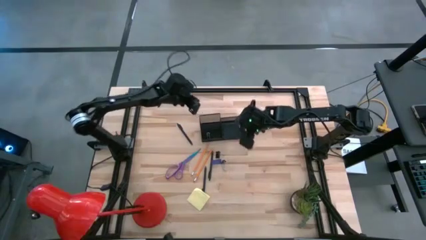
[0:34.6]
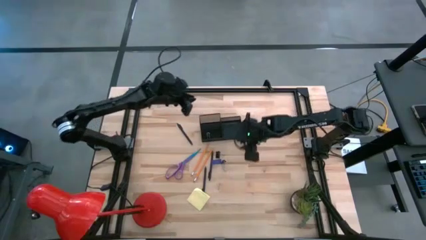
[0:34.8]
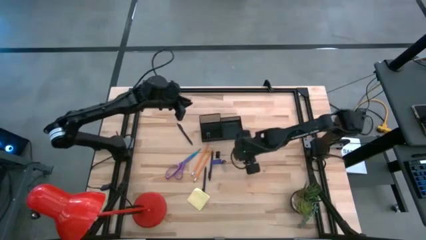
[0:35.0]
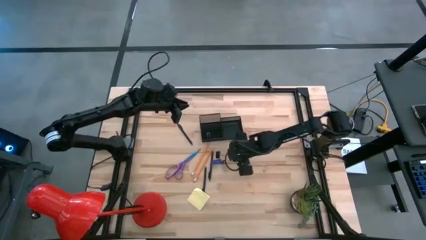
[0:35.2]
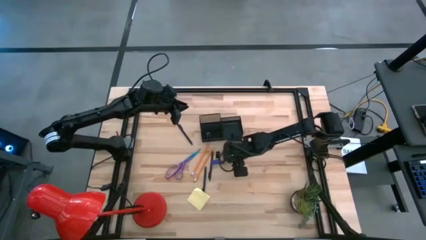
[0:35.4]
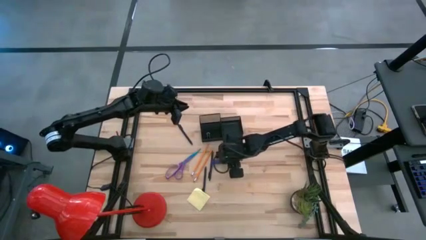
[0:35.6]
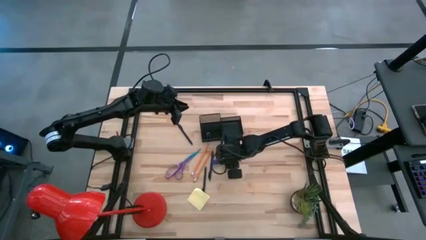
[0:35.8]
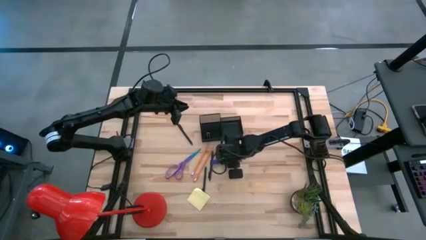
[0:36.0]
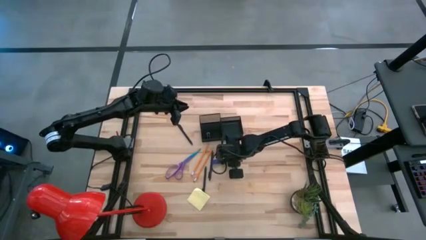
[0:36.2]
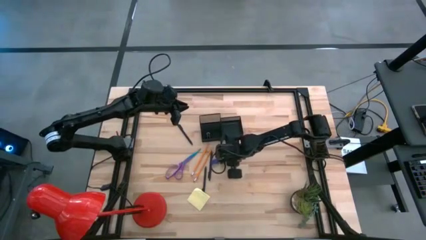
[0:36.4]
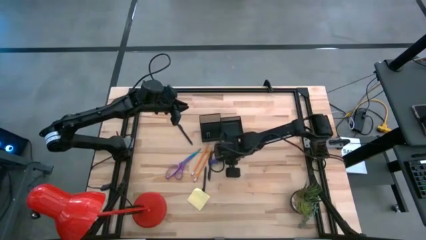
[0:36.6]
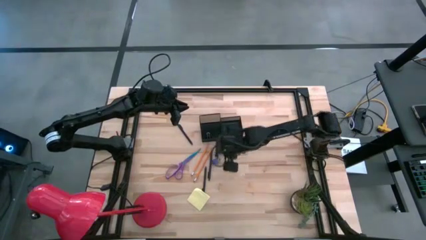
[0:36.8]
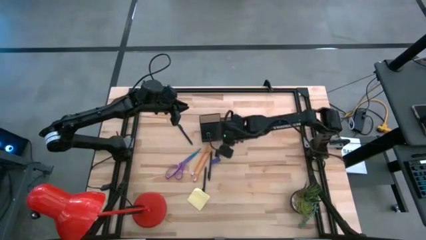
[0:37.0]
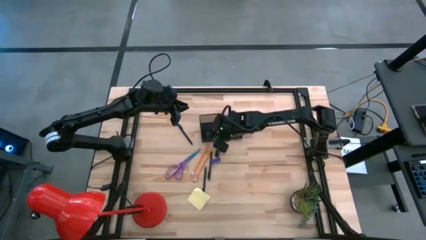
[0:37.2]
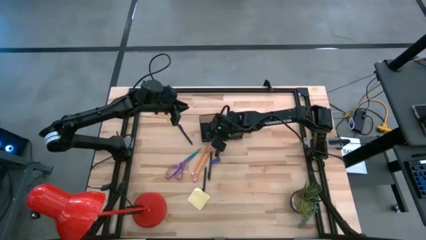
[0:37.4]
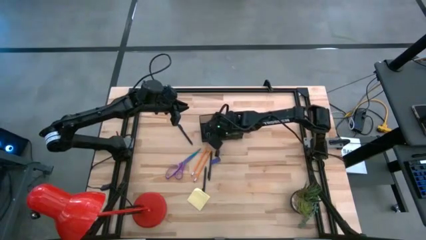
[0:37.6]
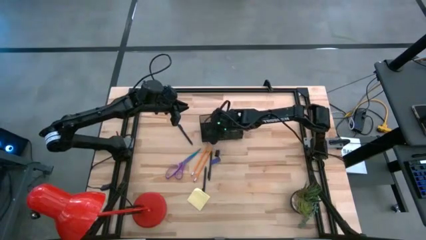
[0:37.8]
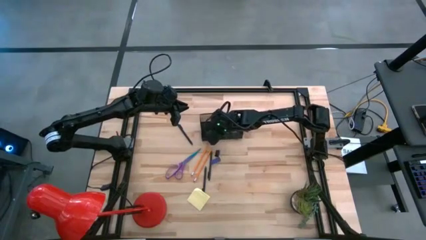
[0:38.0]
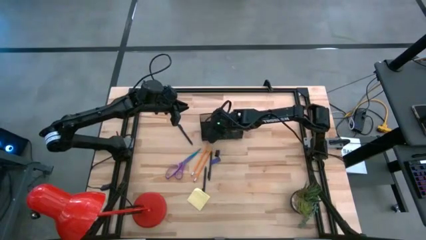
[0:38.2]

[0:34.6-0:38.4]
Task: Pick and place office supplies into organizer
Put the bottom black binder clip into the black desk organizer

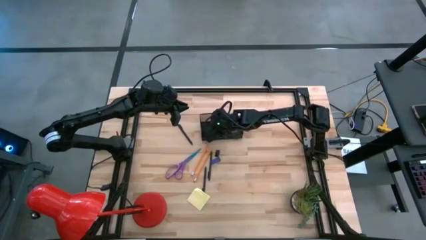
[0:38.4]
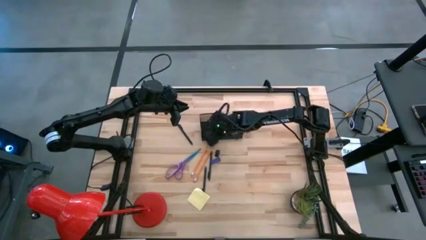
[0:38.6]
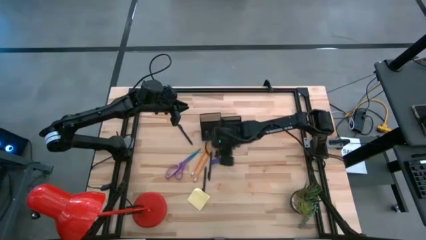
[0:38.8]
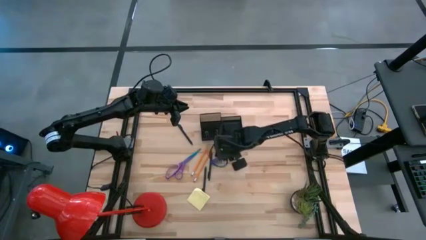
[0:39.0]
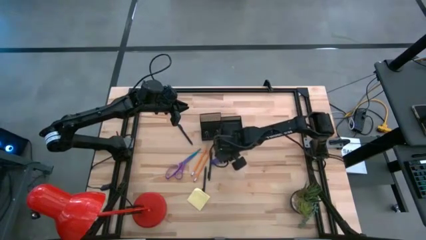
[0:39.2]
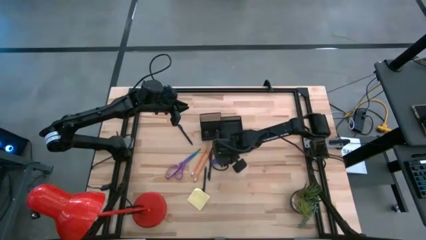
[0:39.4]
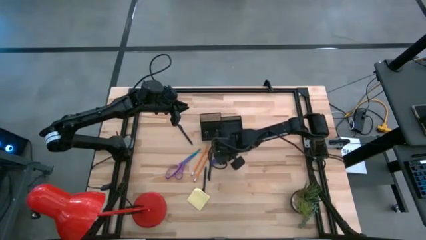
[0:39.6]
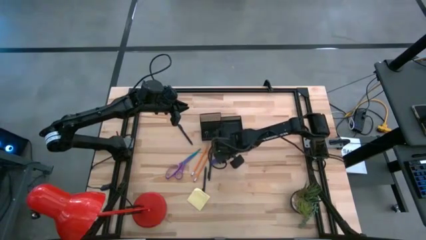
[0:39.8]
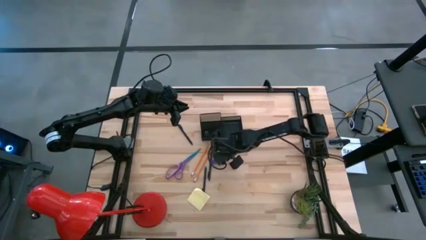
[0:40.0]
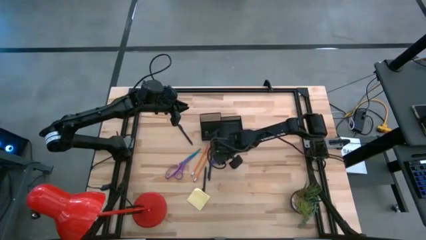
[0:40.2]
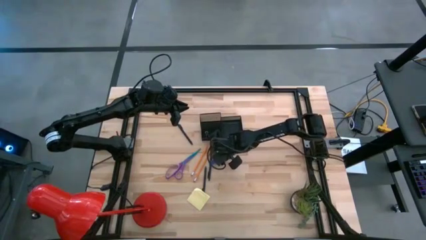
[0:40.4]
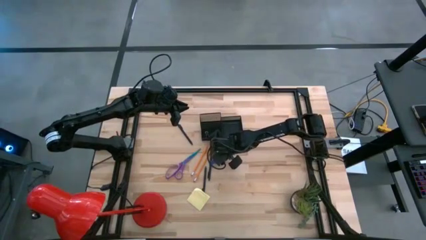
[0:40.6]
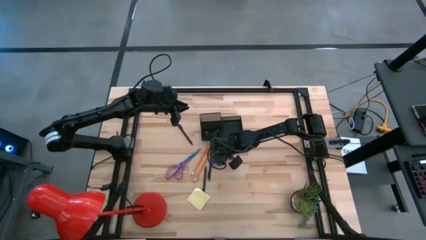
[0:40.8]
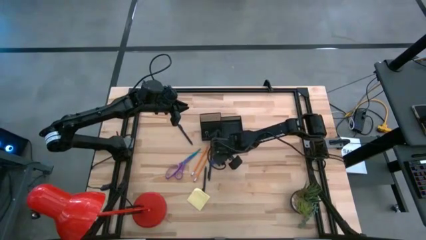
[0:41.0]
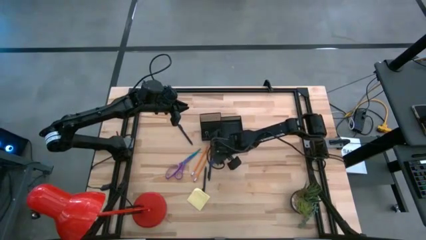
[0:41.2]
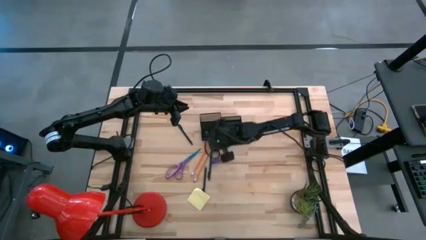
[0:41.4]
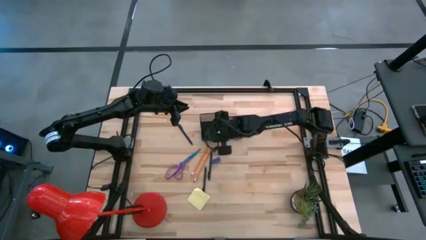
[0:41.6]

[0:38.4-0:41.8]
Put the black binder clip into the black desk organizer

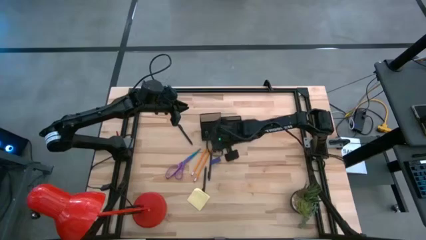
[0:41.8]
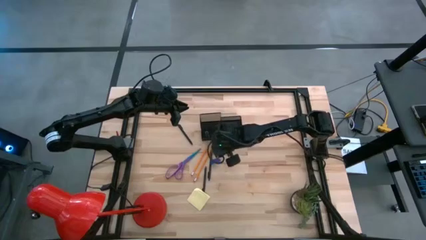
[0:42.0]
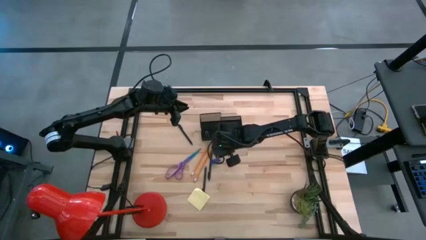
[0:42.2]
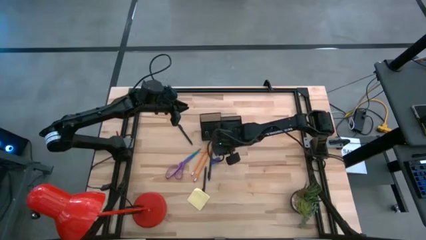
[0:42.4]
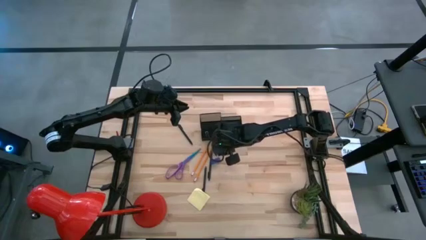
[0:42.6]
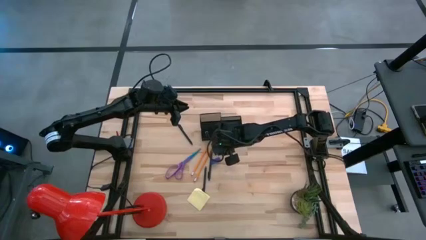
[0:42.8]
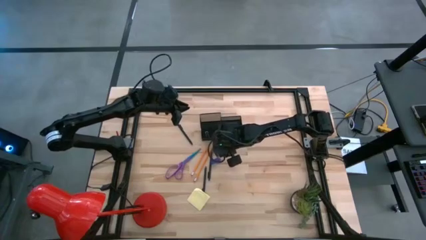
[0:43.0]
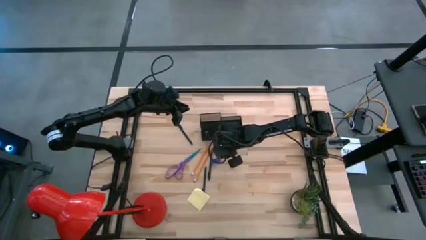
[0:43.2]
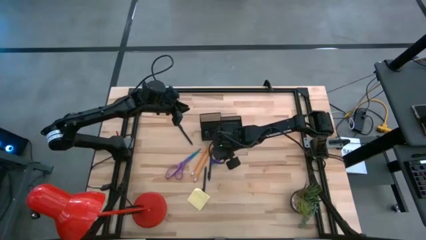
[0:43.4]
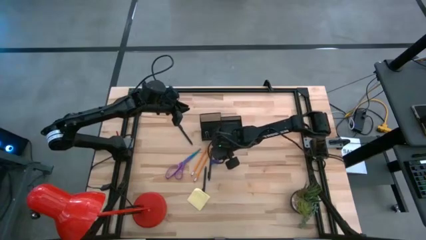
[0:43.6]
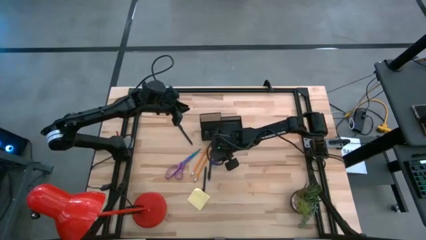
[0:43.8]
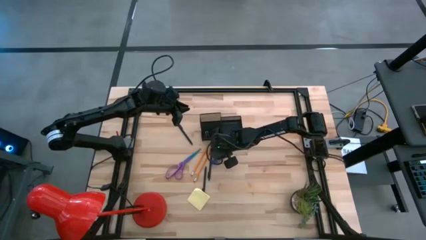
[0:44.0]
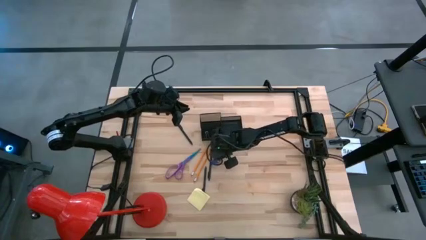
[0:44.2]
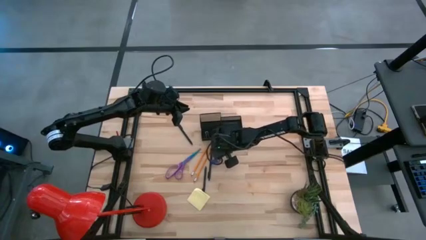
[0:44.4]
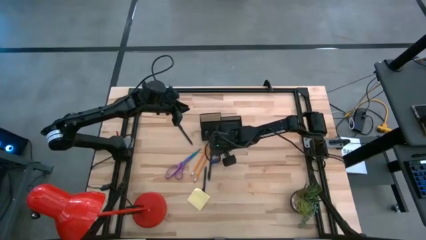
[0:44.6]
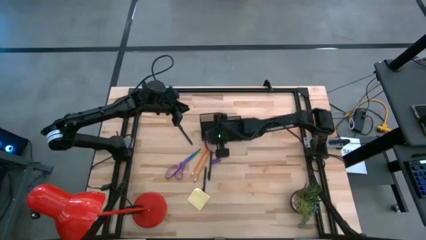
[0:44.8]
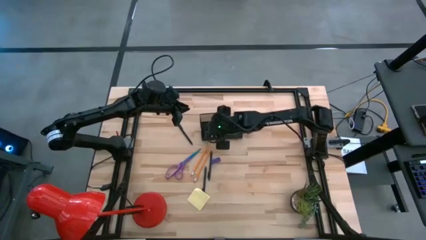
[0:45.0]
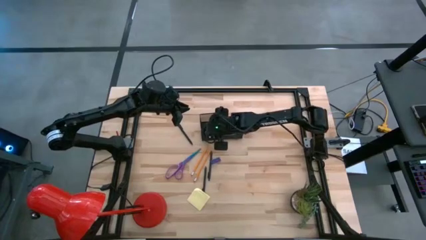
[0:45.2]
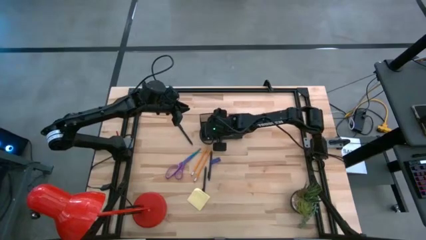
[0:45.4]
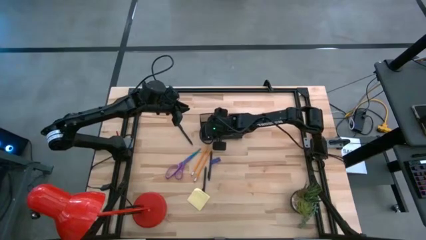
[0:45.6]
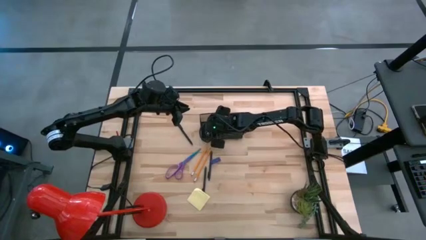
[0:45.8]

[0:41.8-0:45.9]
Put the black binder clip into the black desk organizer

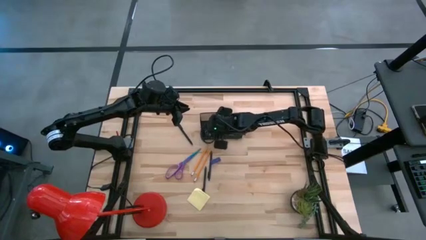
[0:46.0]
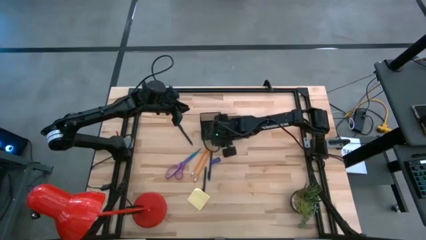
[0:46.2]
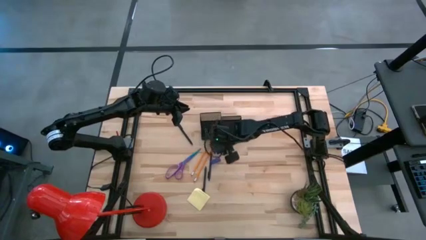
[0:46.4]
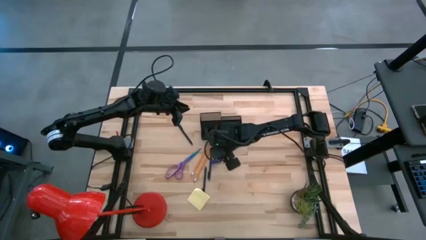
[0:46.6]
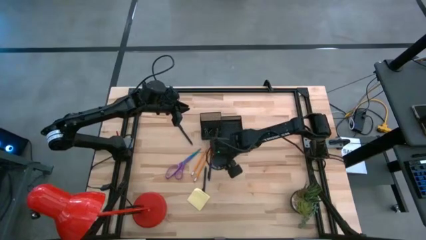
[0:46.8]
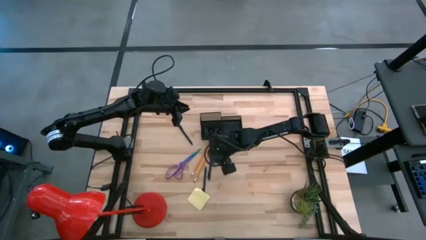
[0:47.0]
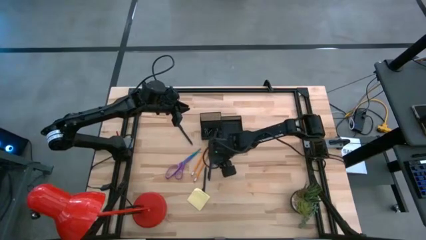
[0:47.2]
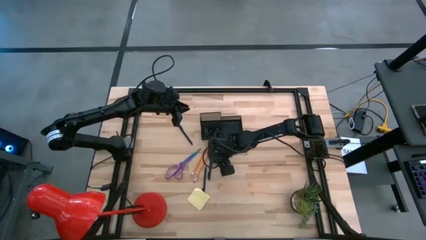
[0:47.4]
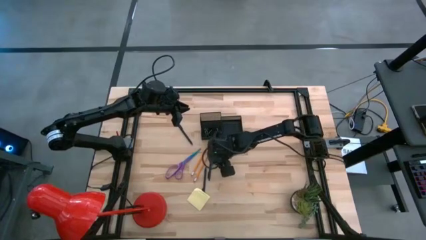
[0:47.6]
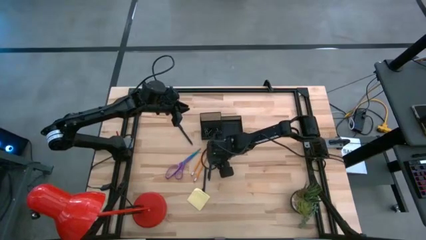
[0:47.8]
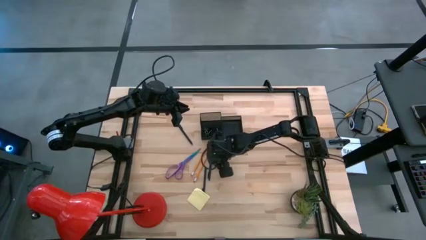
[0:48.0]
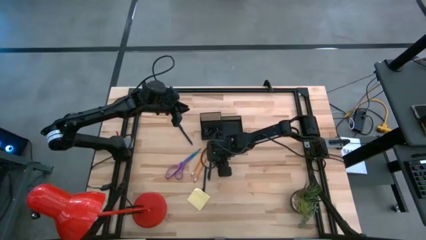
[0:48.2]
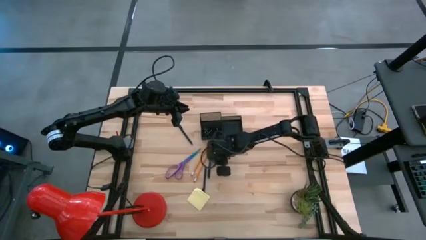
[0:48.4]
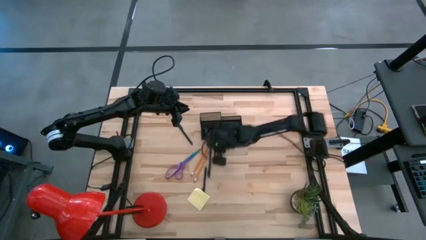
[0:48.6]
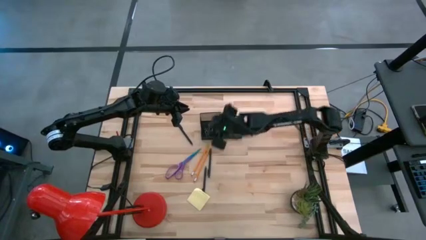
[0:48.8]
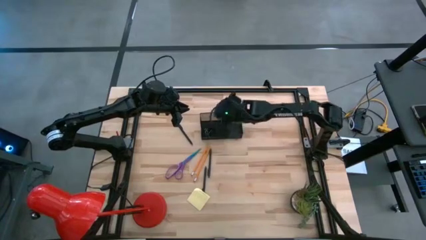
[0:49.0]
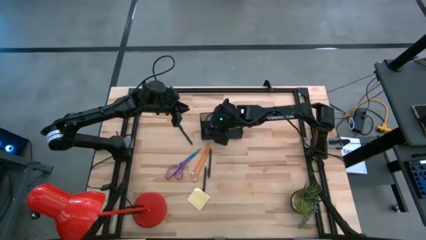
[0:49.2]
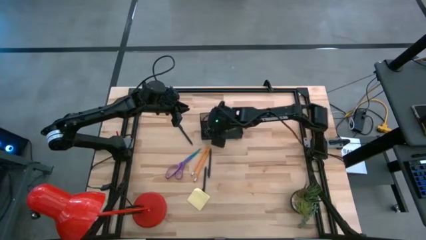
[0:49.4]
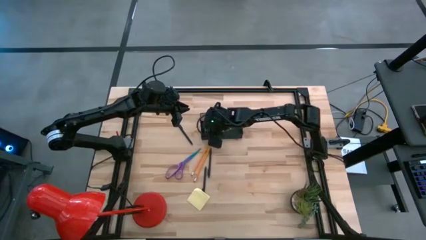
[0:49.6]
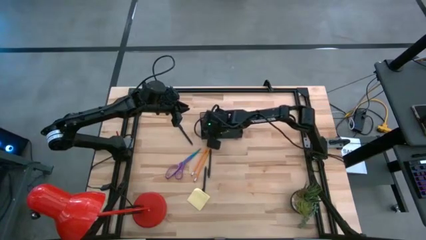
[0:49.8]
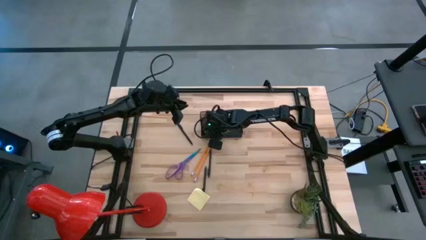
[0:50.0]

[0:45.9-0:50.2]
Put the blue eraser into the black desk organizer

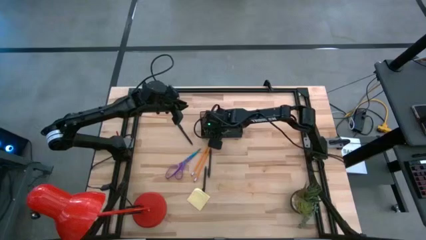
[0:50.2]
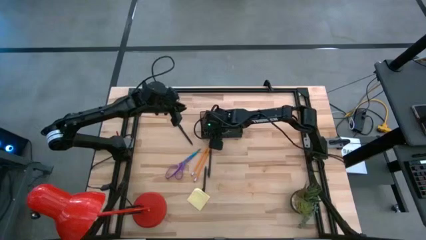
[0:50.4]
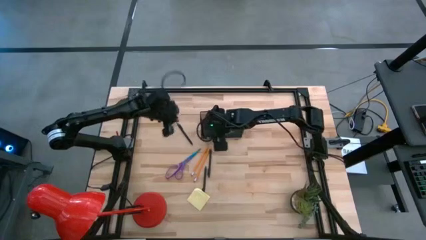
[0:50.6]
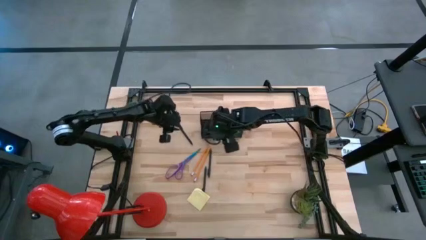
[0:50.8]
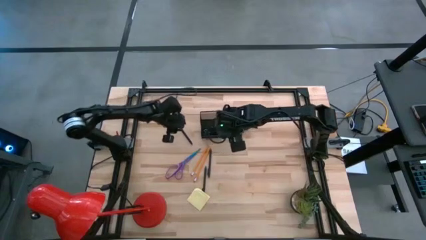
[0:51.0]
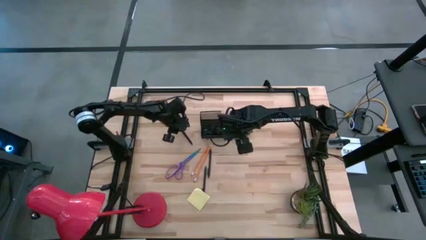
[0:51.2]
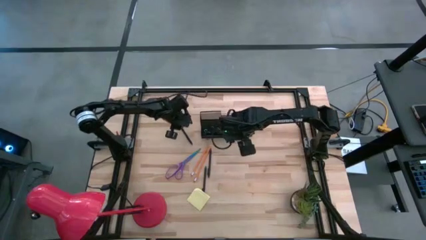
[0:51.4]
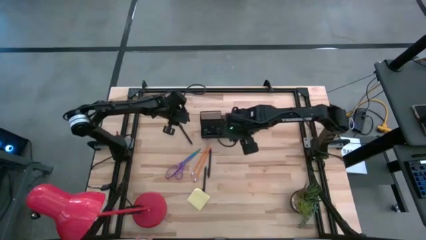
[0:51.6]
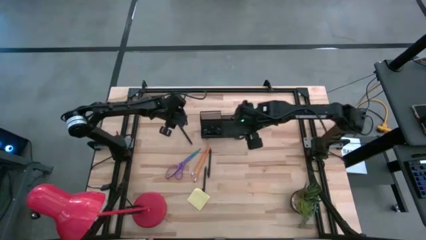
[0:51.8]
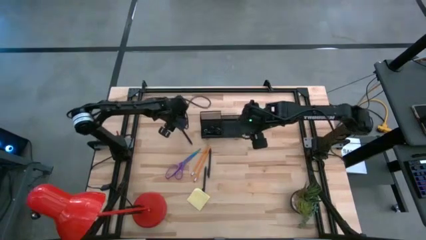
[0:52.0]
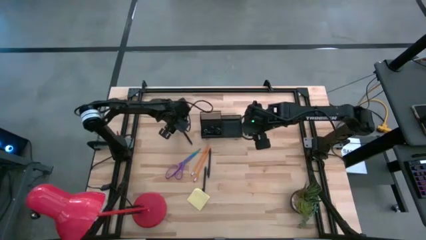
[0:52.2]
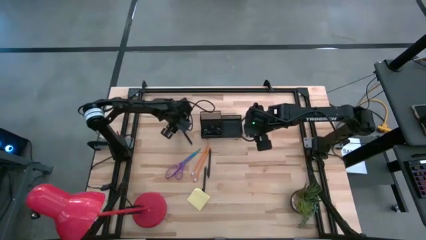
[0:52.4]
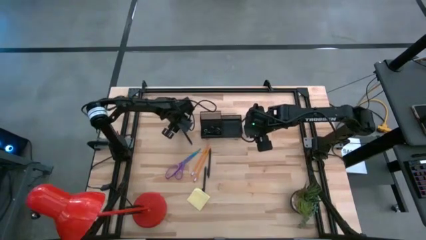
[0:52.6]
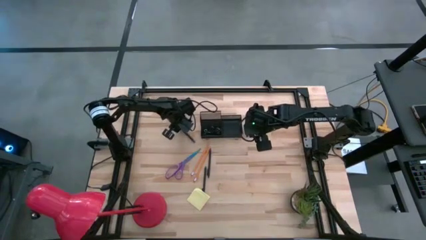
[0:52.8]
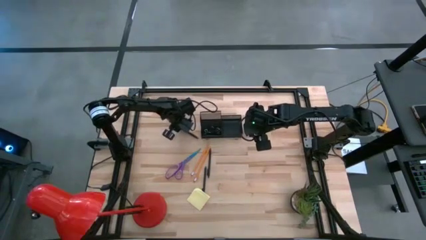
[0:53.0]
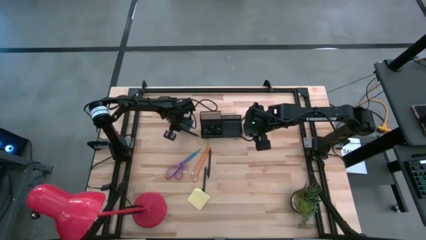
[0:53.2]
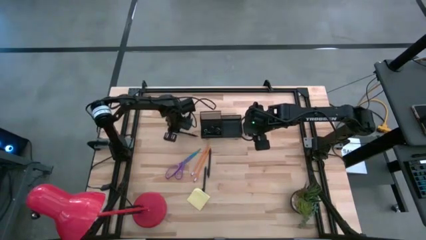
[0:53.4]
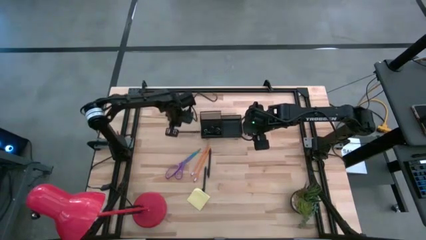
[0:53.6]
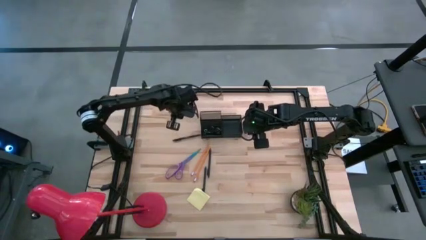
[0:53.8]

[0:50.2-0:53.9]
Put the top black pen into the black desk organizer
